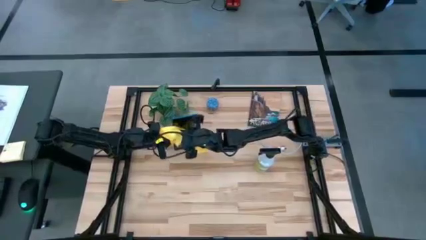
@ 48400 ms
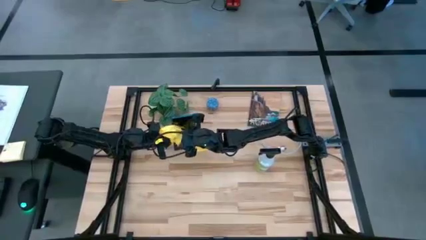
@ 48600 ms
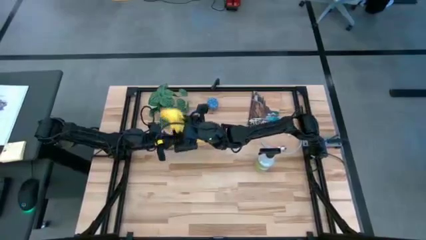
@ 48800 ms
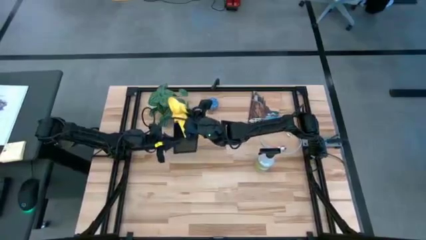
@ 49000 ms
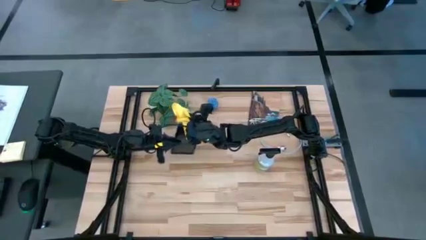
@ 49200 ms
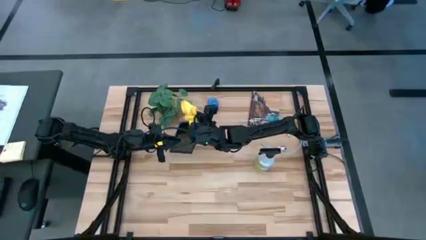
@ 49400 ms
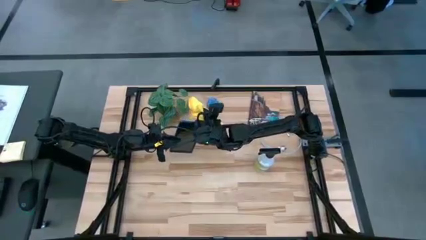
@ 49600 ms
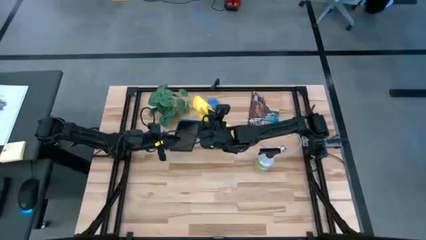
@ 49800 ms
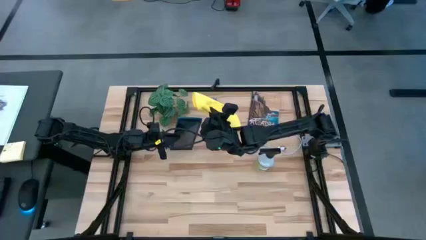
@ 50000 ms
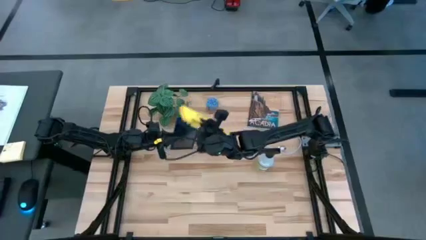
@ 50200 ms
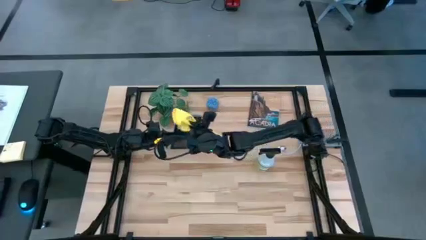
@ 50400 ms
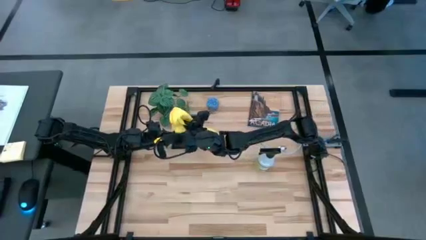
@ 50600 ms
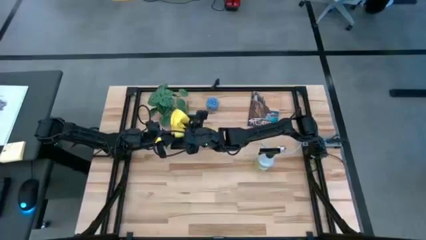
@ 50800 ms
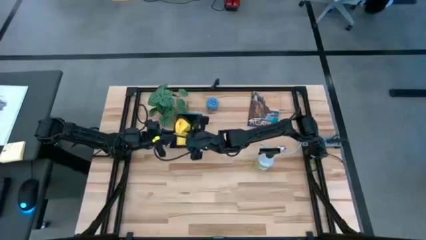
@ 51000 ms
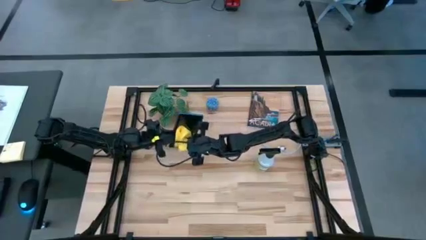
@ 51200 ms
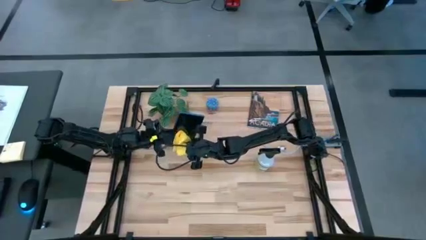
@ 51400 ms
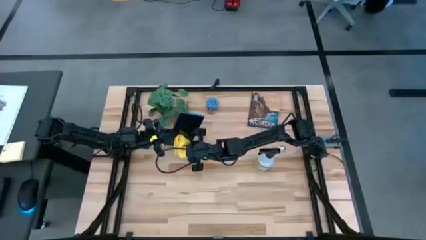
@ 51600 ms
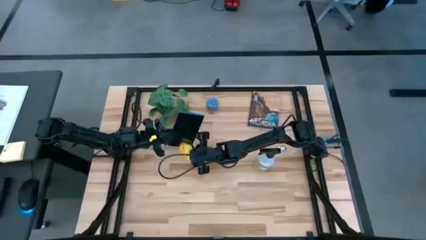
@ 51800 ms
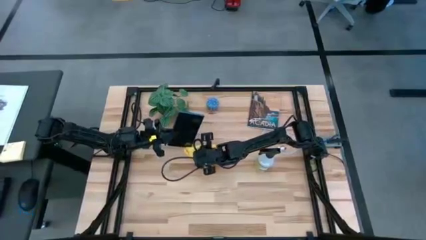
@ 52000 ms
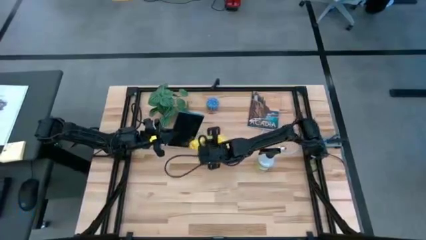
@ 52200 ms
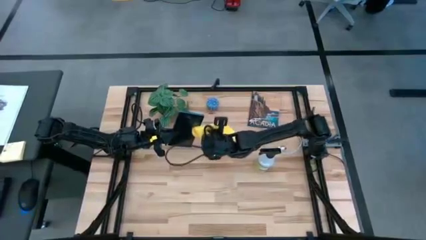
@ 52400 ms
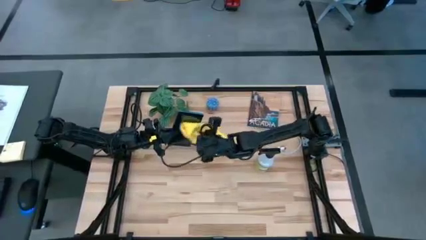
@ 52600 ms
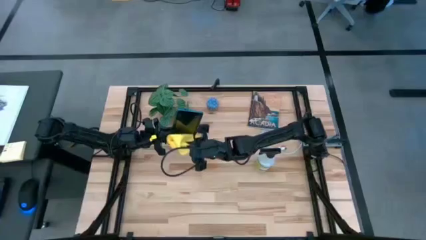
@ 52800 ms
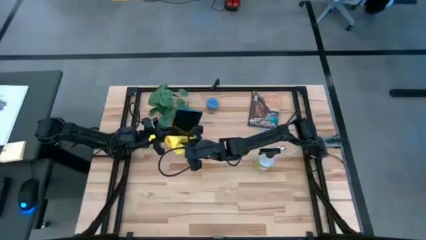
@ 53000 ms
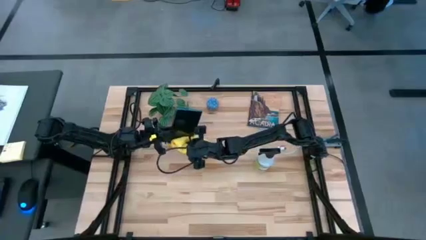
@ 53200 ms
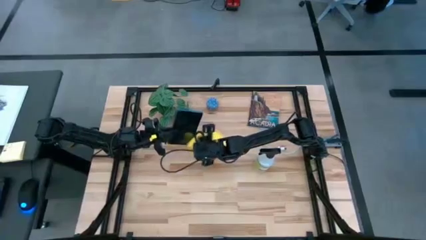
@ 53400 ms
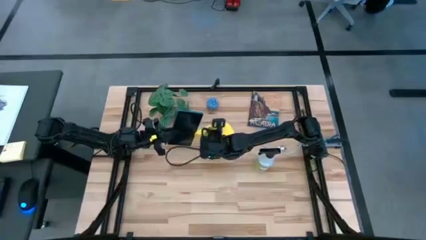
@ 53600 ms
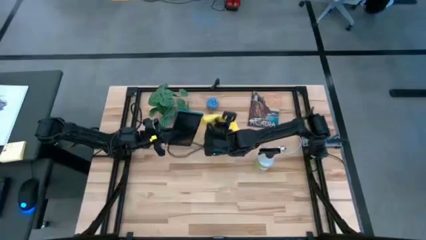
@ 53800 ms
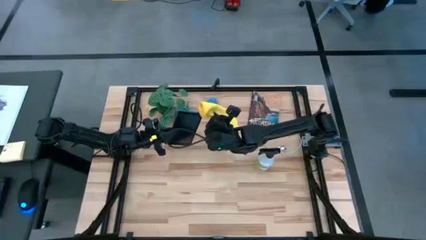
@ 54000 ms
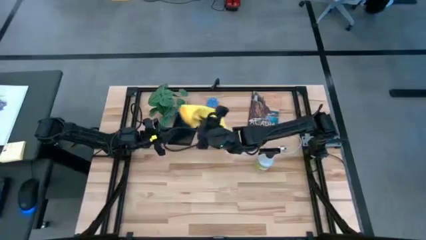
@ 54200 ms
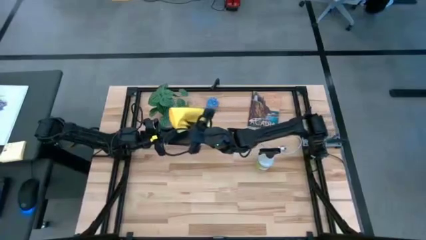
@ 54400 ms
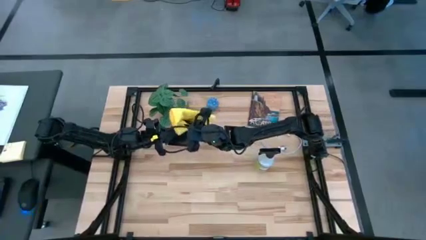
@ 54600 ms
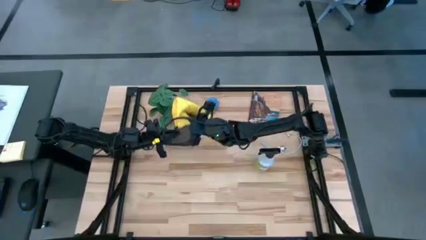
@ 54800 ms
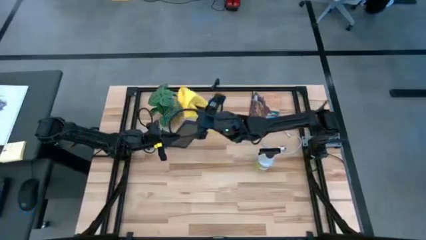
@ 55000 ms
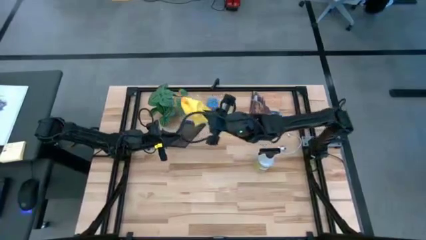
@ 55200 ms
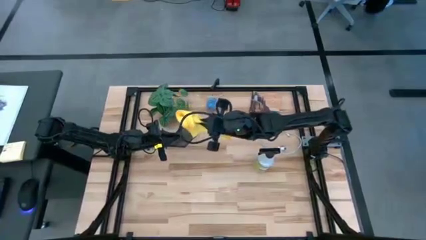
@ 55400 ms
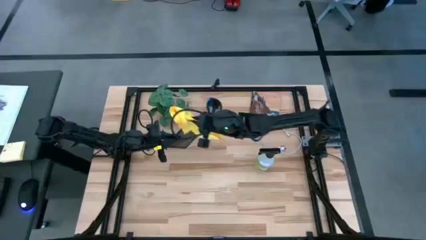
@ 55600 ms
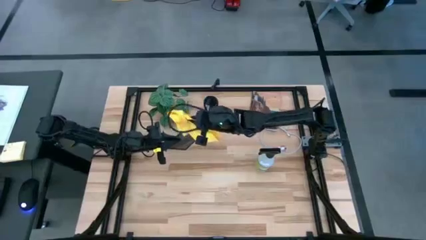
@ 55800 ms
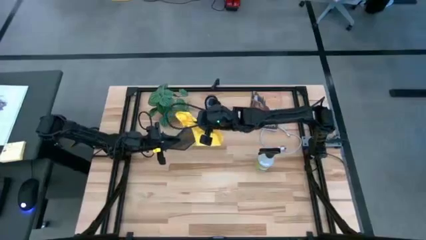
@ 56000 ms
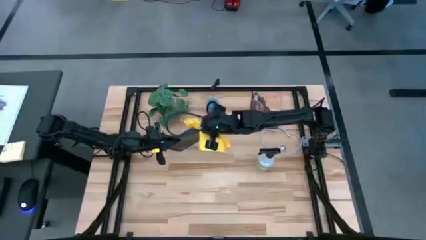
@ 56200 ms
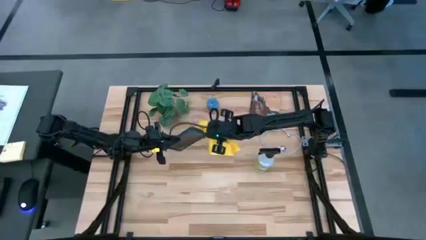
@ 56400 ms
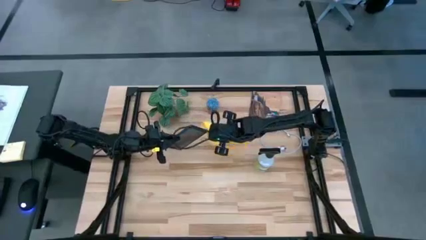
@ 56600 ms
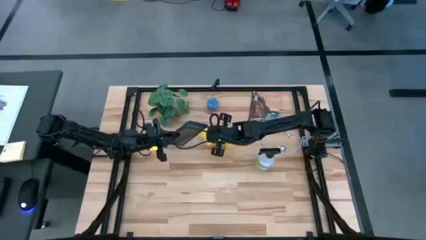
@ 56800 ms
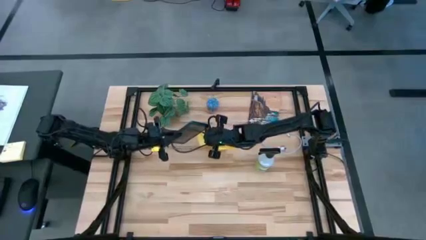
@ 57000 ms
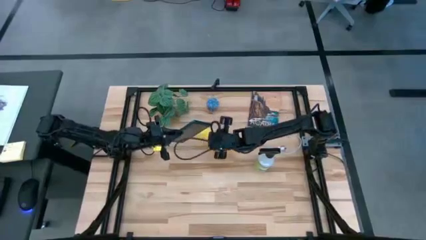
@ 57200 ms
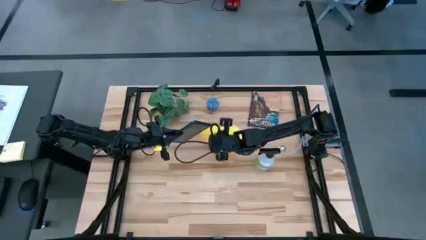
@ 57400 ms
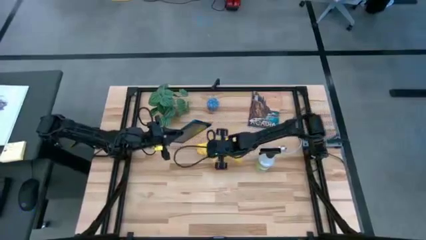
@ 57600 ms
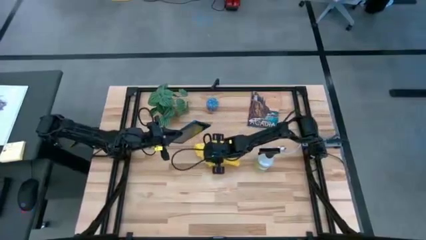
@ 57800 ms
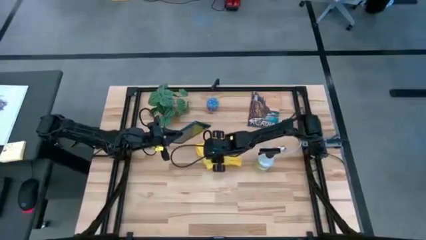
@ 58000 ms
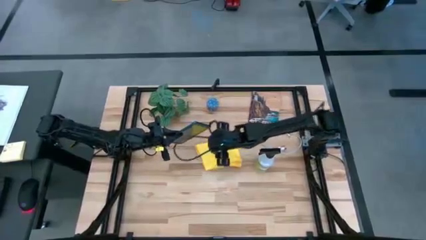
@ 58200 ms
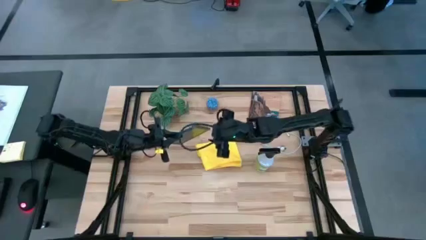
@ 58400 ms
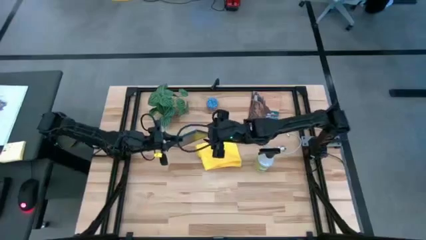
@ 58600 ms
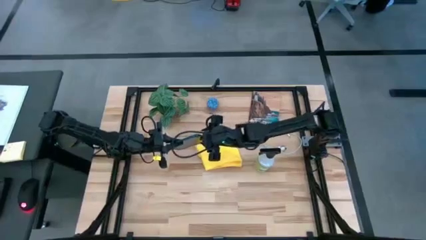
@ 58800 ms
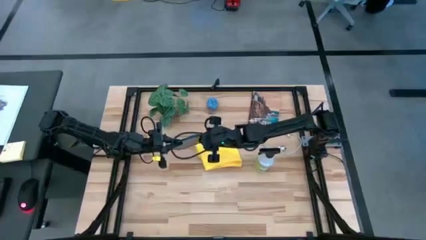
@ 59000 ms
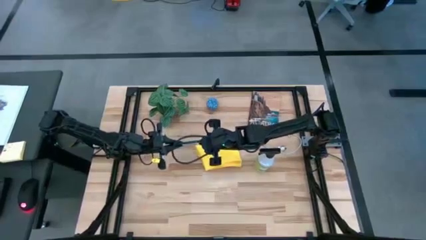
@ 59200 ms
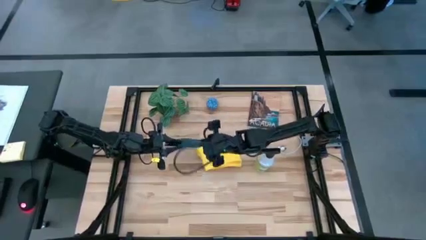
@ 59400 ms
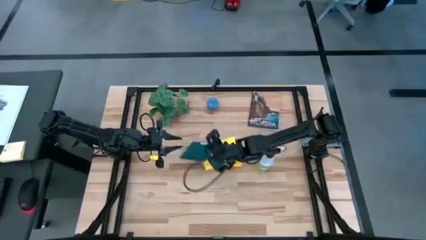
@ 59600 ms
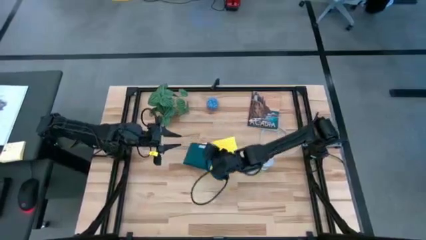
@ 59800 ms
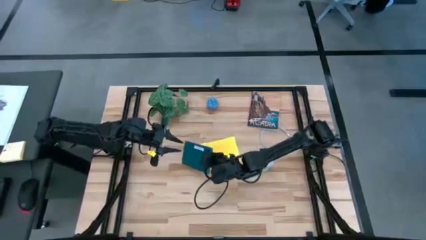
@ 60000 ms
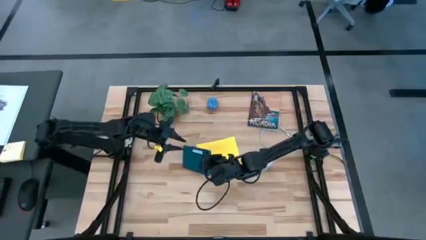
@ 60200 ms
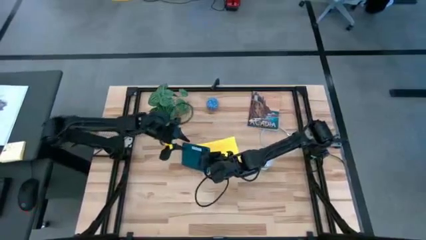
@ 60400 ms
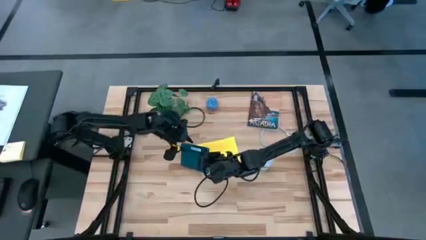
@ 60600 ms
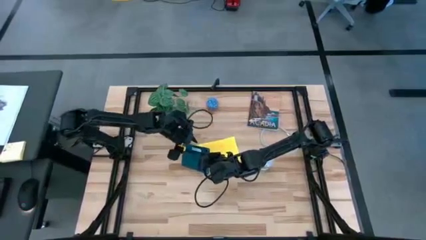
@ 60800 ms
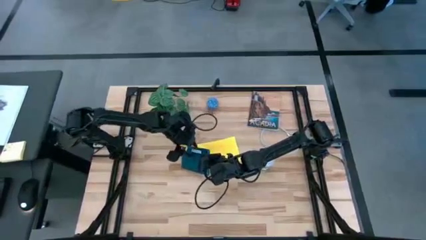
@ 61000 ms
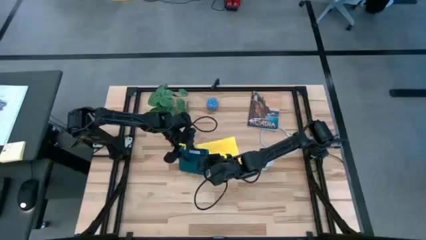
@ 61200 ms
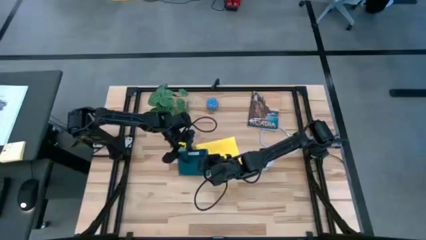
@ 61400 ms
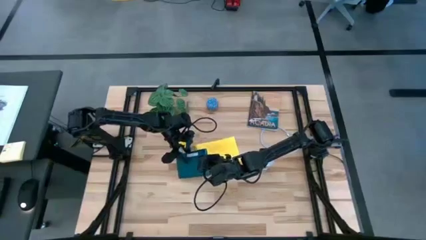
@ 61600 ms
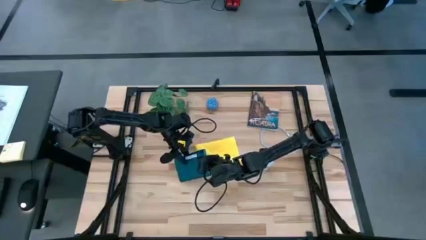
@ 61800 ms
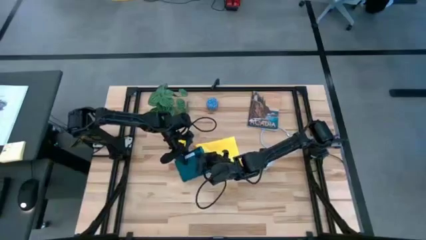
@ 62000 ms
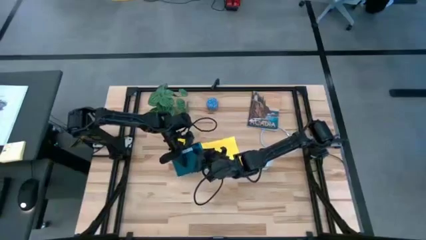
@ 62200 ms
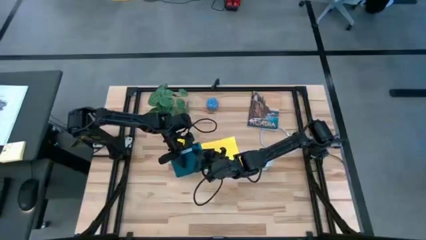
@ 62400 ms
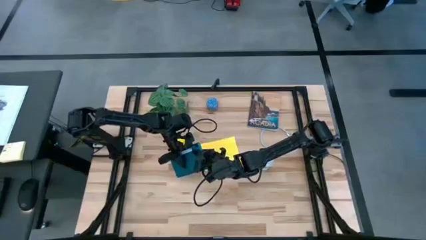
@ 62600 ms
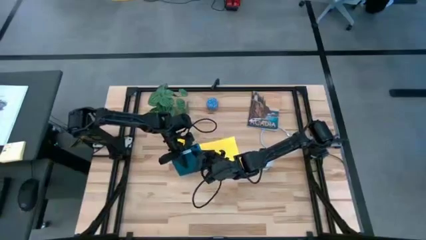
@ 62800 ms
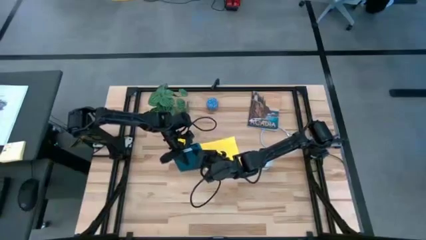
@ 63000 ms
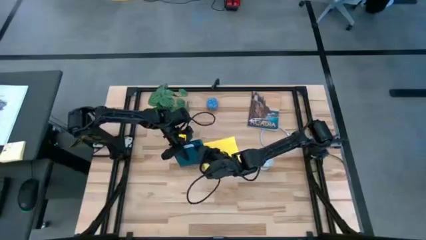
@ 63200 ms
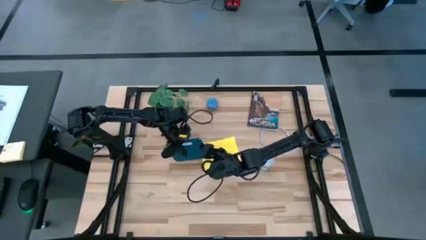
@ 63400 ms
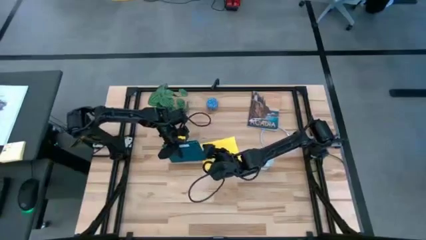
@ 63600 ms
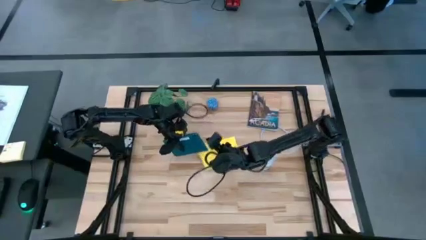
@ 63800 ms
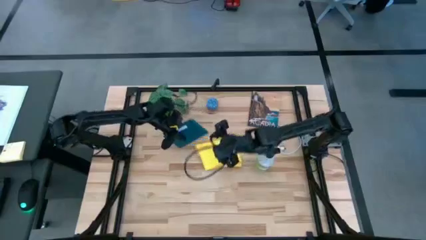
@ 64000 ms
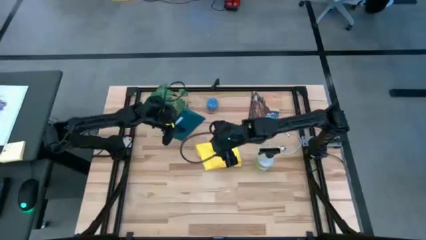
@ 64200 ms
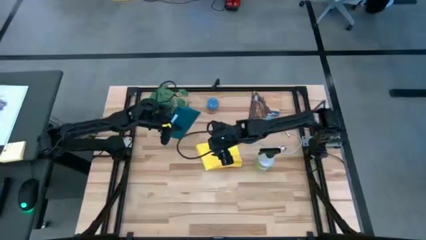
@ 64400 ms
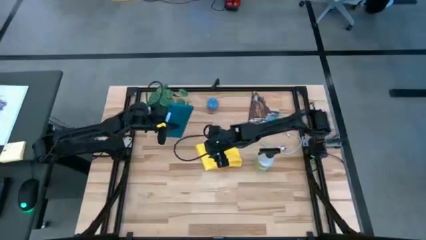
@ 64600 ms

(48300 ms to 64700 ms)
Task: Apply microfiber cloth
Wipe the front and back of the blue tablet using the yellow microfiber cloth
